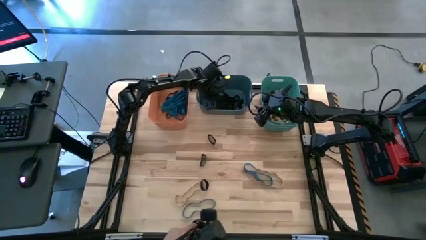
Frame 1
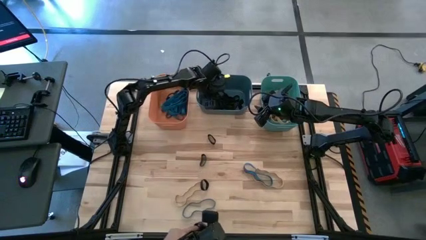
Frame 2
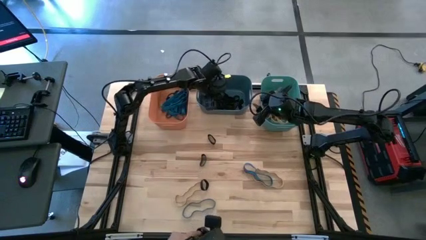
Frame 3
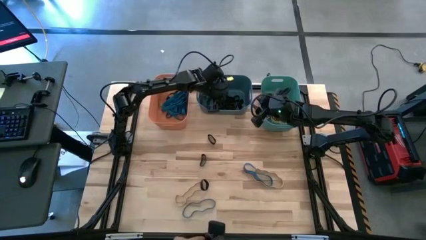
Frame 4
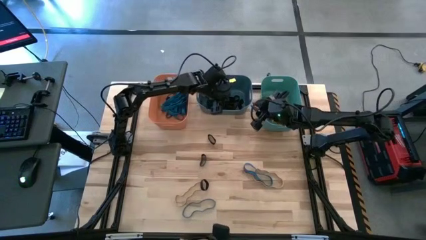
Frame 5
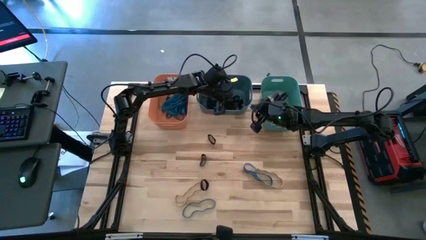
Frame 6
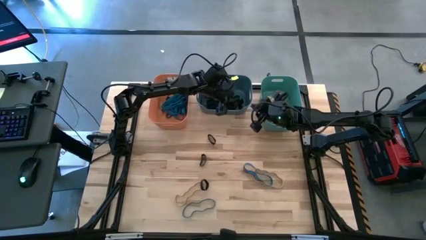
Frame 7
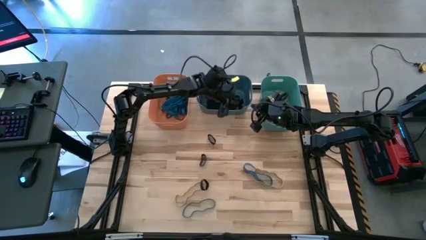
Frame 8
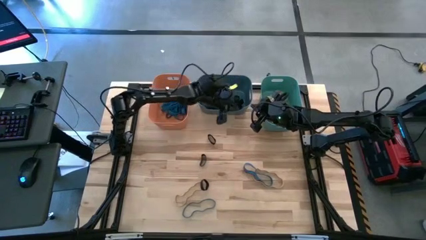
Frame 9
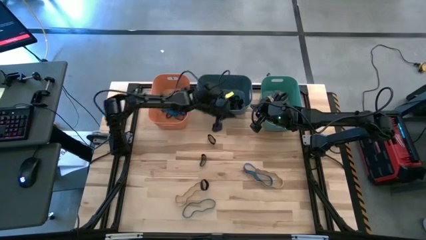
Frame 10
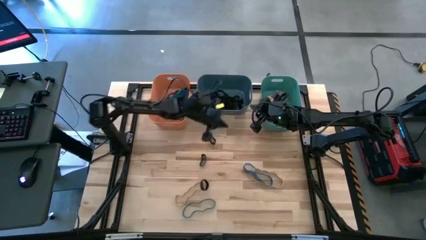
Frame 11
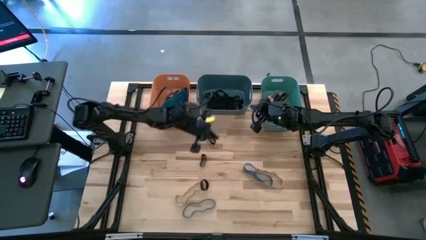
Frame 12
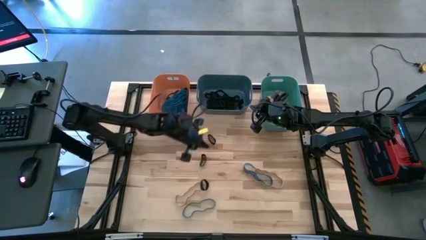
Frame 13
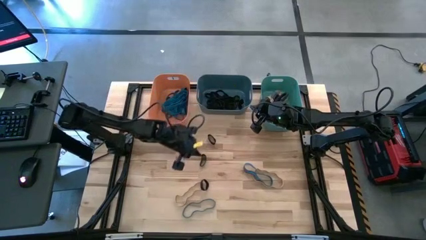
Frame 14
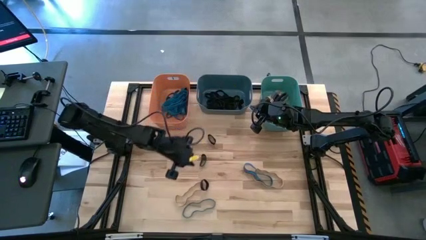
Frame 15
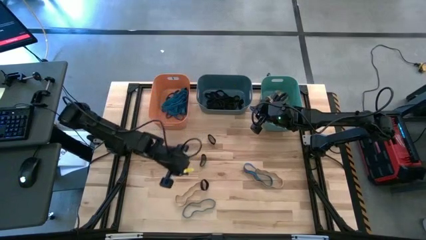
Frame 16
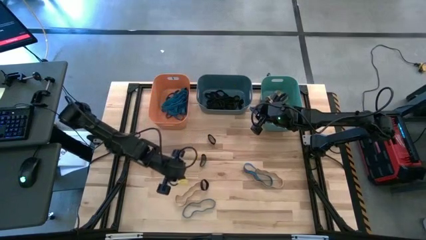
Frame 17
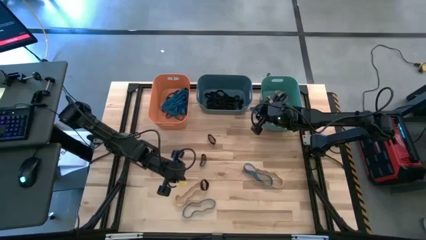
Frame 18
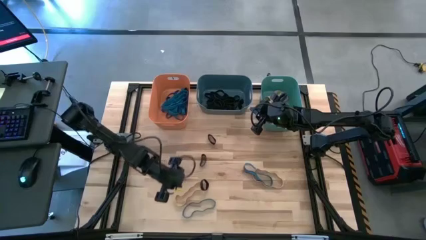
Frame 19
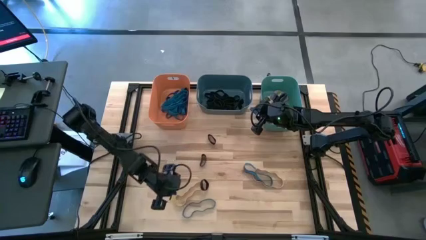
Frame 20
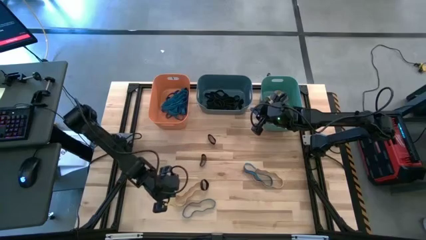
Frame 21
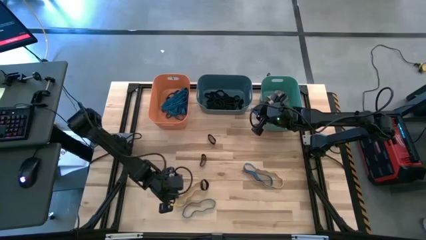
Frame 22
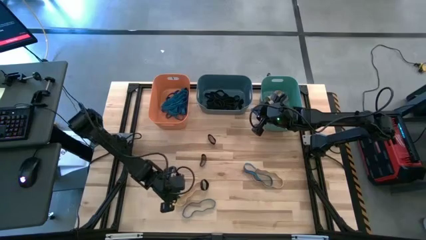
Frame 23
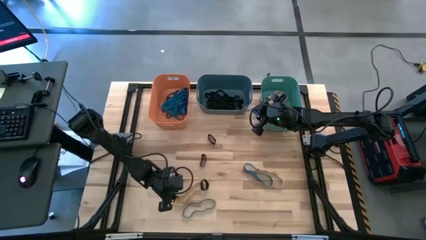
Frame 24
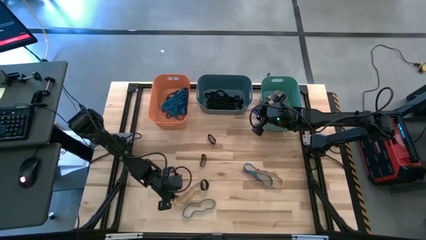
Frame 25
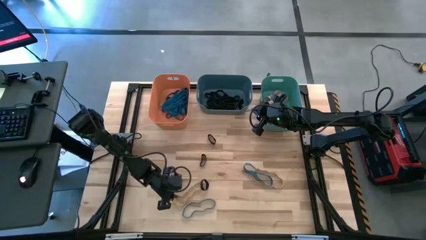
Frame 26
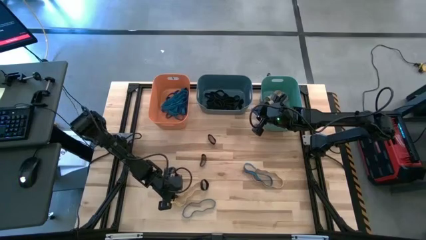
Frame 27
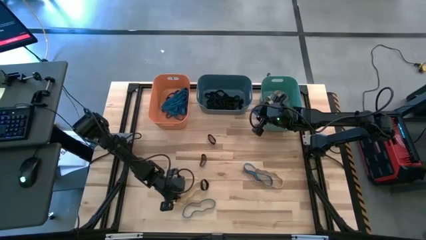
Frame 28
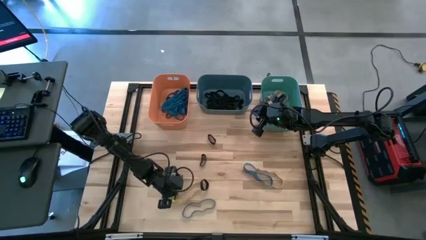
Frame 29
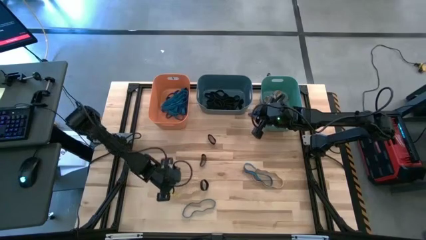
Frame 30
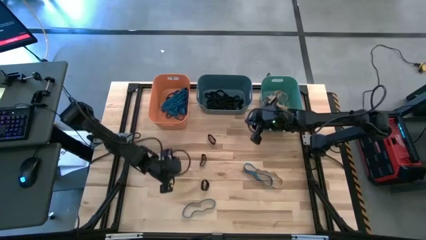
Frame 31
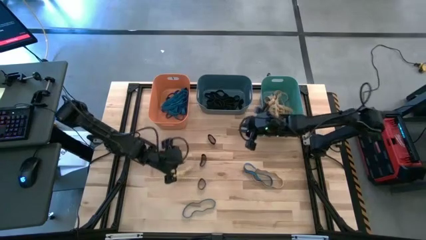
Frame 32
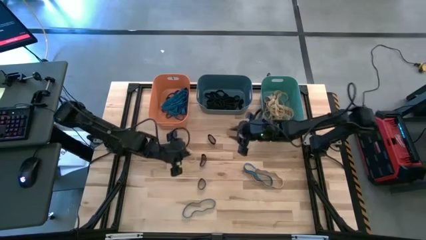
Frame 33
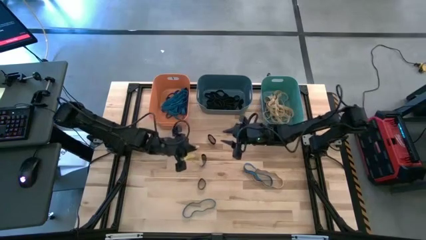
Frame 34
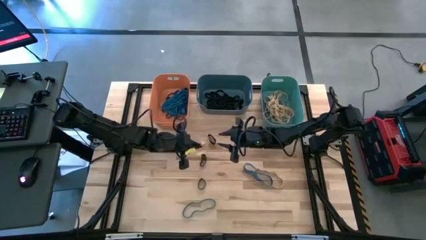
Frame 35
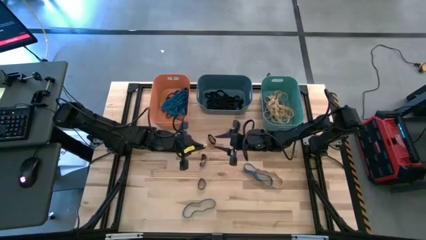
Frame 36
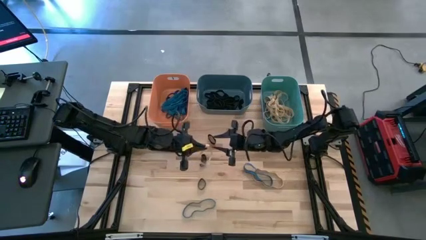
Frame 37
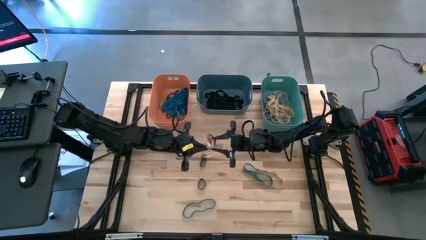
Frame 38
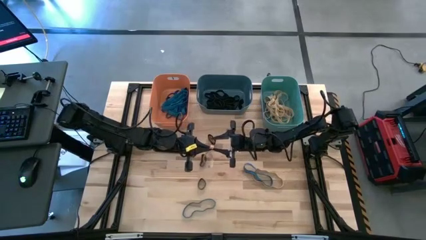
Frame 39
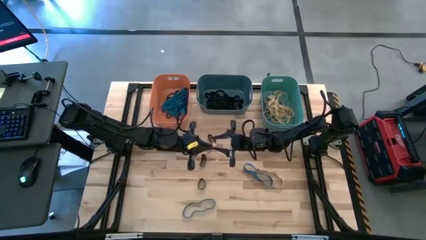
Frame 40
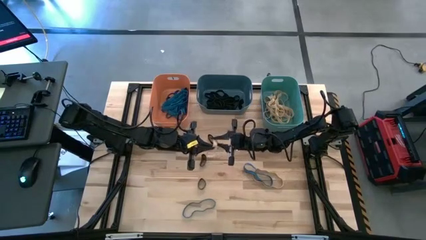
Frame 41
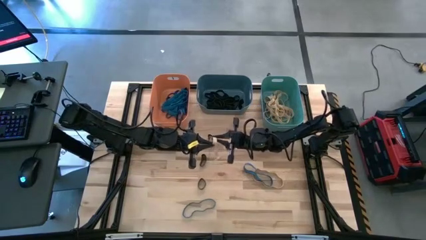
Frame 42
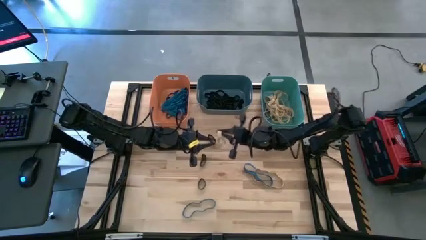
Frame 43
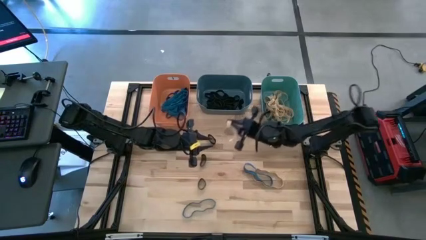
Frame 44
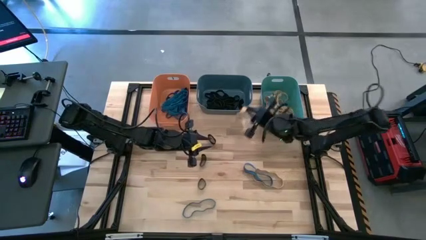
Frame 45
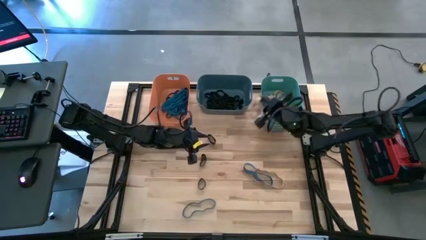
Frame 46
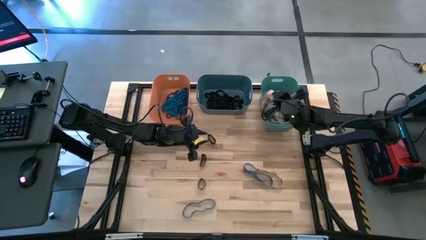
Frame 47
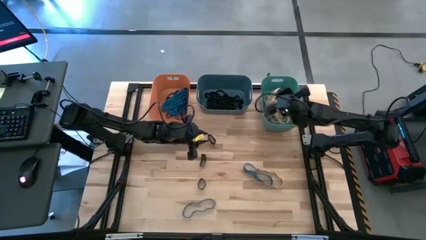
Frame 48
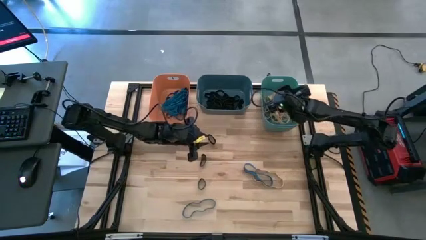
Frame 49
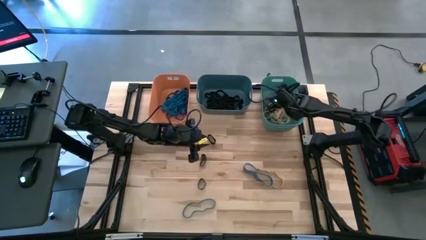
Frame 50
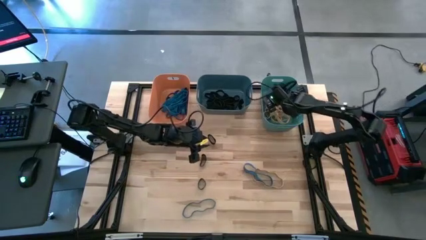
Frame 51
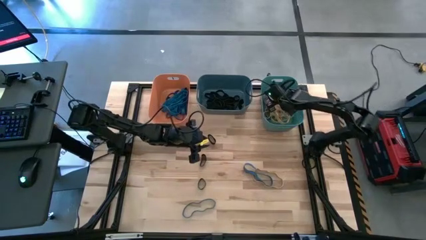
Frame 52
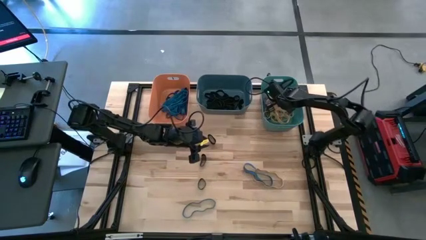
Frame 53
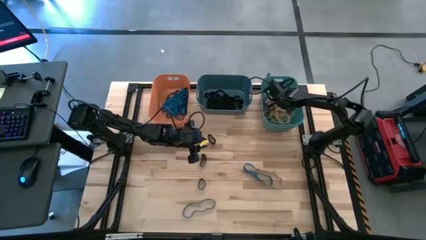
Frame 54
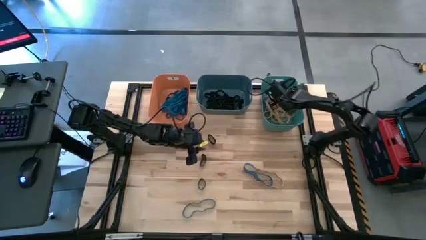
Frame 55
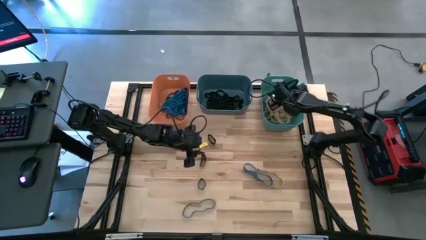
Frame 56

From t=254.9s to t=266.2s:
Task: Sort rubber bands into baskets
Put the brown rubber band into the green bin

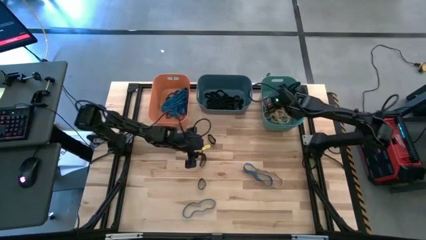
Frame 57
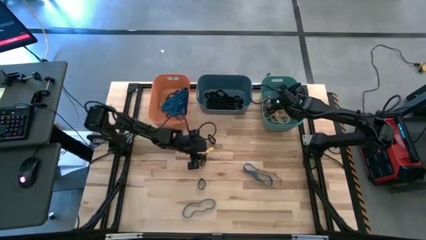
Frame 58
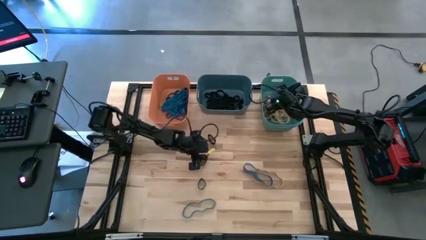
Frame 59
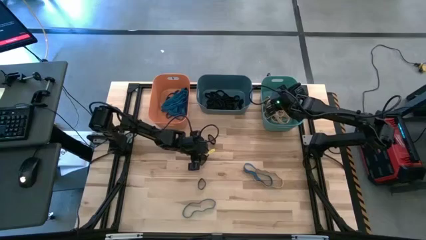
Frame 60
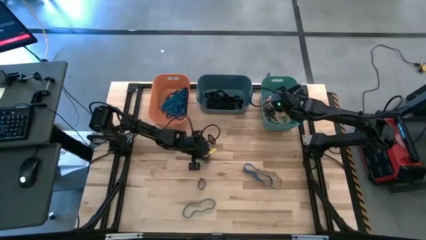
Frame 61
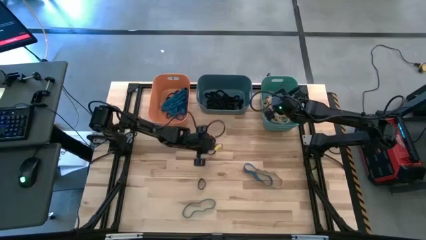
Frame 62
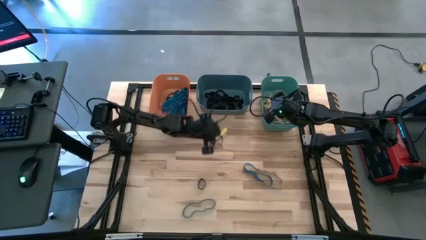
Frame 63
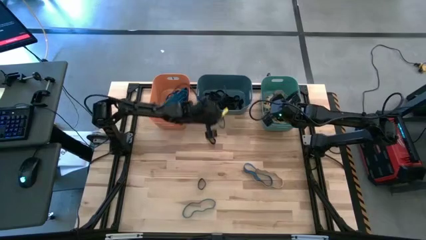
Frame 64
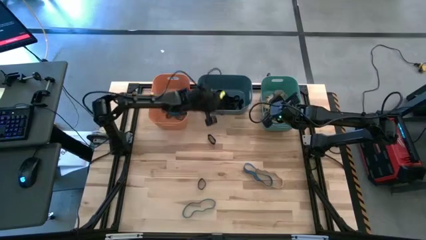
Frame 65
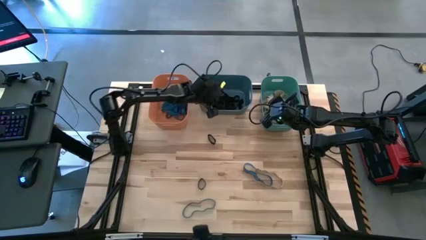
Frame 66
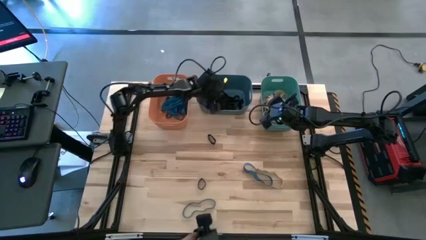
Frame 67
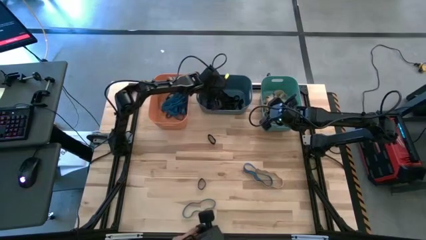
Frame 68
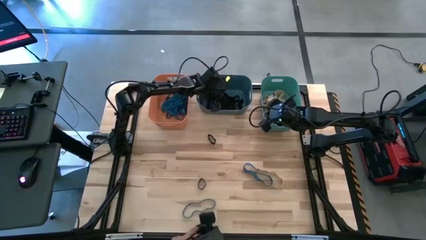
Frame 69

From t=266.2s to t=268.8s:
Put the black rubber band into the blue bin

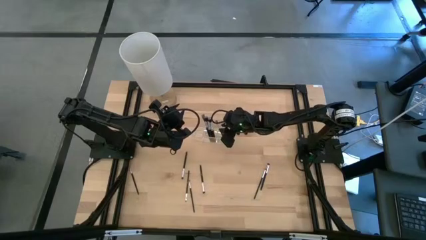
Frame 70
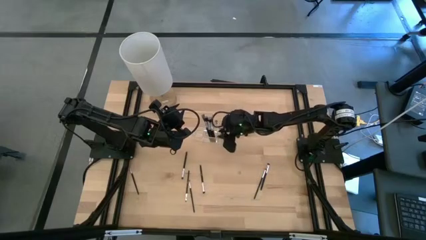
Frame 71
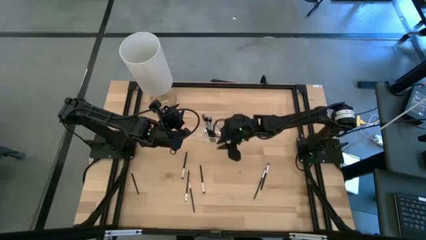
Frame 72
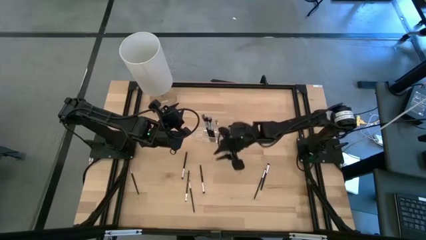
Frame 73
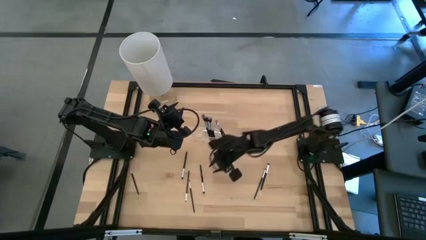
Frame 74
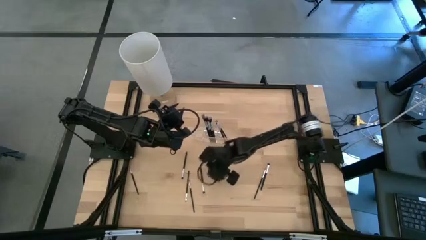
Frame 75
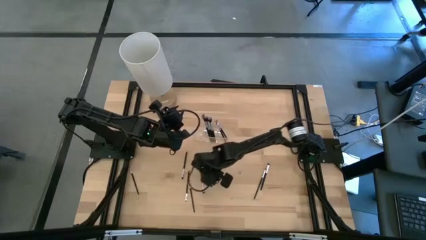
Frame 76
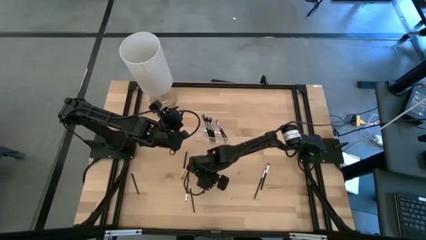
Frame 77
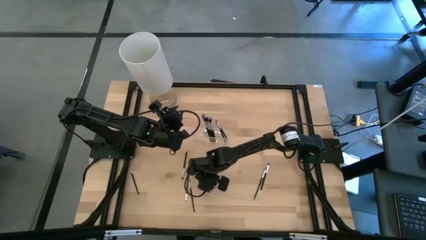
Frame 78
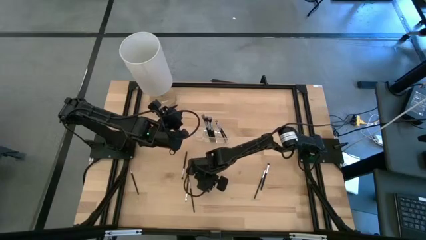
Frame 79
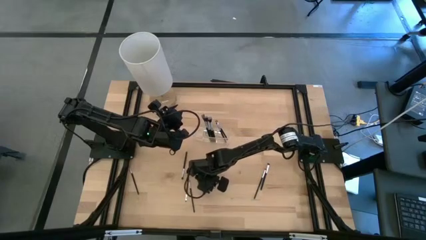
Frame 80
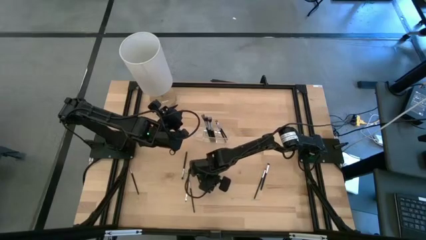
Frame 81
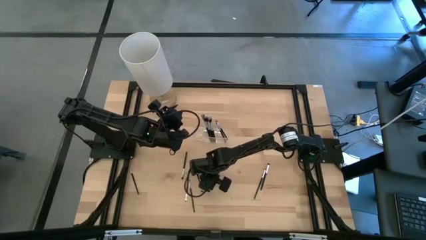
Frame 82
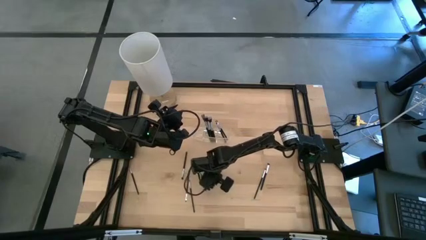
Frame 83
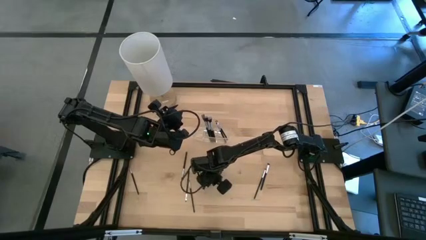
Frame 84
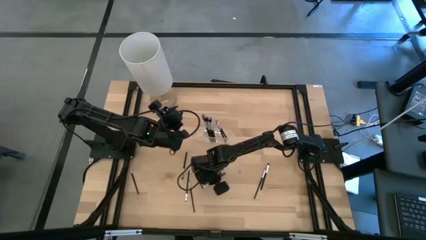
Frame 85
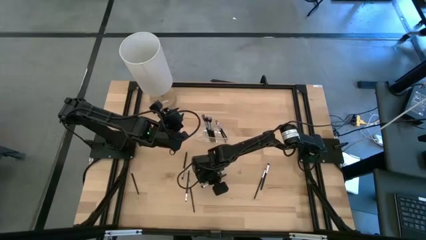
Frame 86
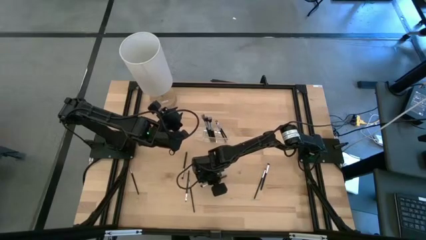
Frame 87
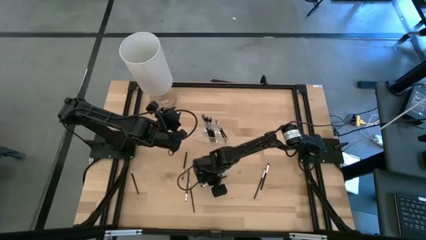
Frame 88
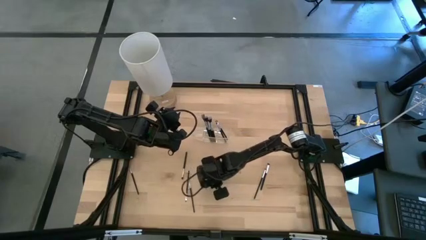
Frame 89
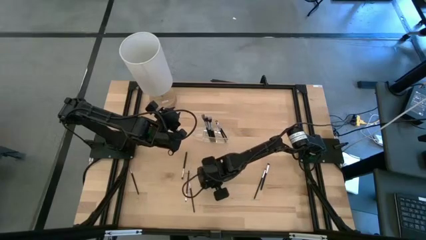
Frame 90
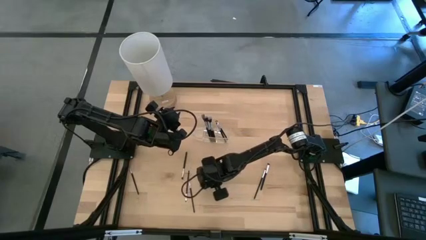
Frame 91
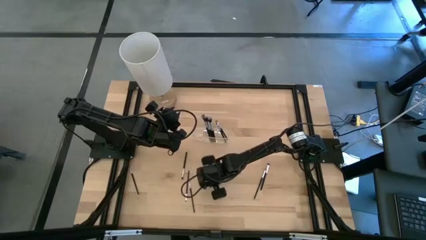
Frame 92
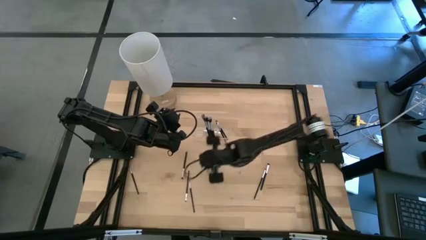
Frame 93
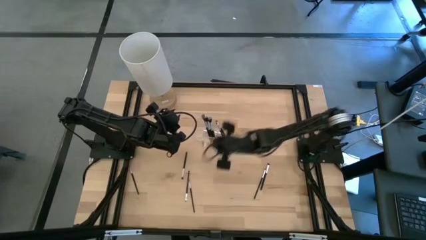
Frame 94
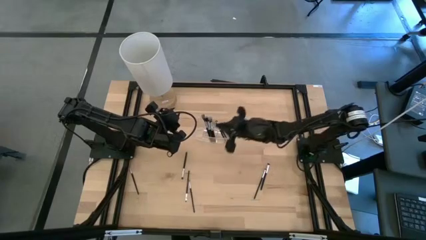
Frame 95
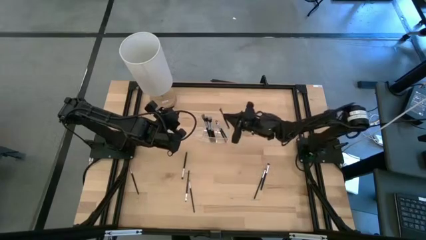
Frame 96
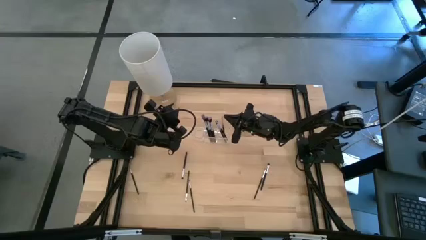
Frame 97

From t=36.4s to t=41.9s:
Task: Put items in baskets/containers
Put the black eyeshadow brush into the transparent organizer
